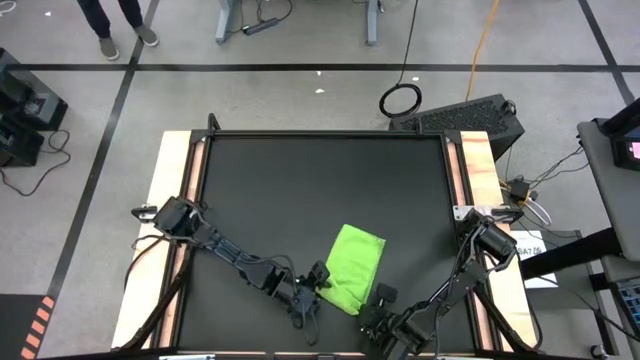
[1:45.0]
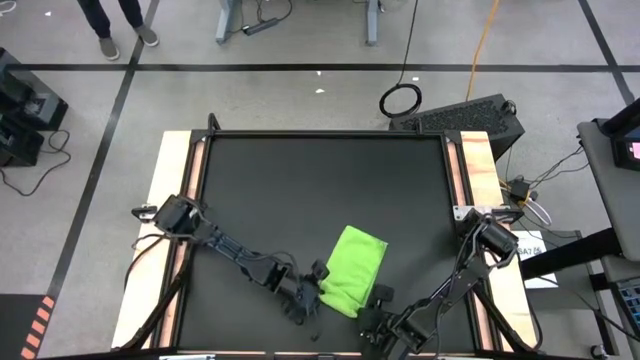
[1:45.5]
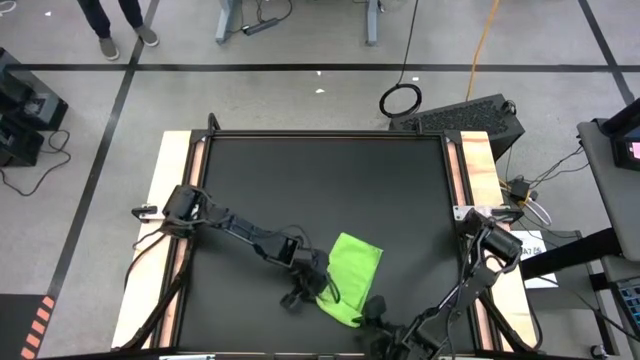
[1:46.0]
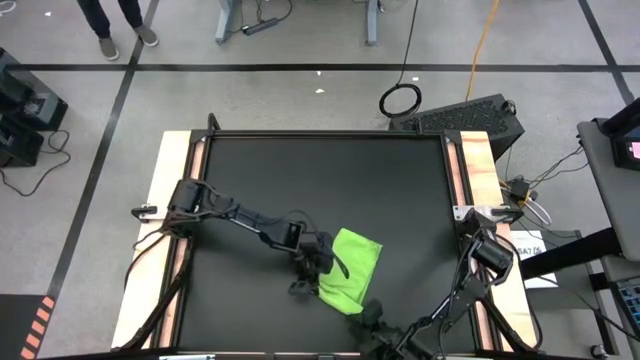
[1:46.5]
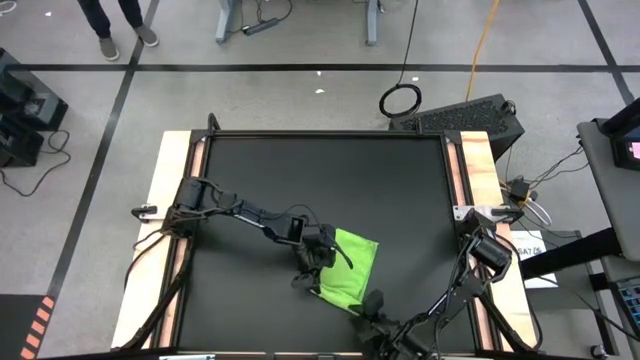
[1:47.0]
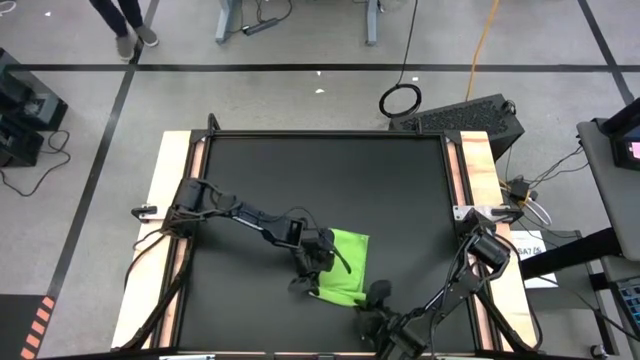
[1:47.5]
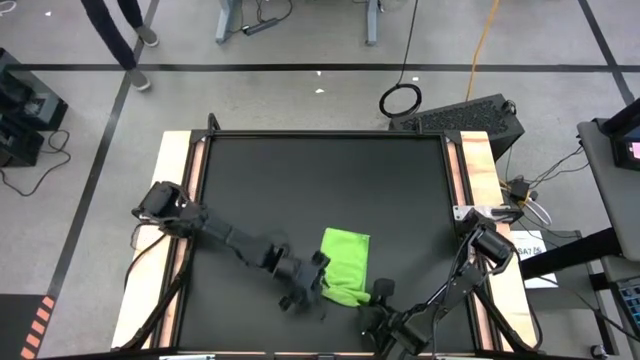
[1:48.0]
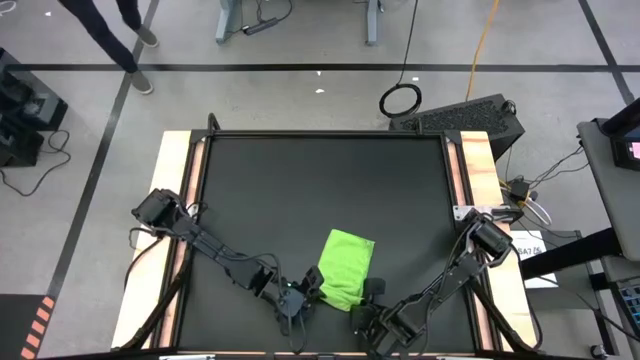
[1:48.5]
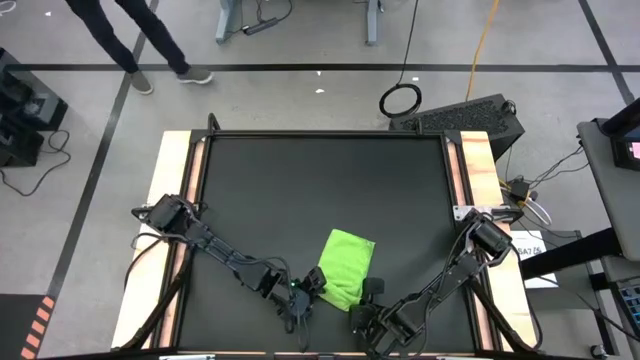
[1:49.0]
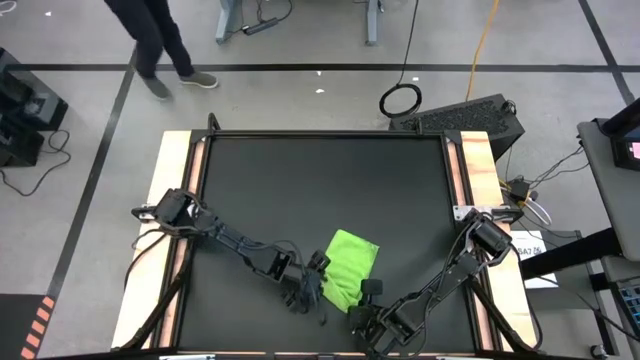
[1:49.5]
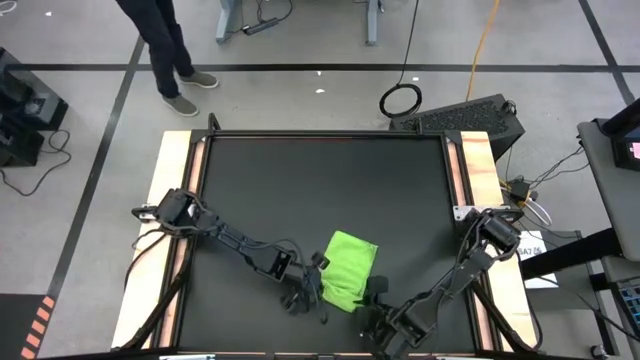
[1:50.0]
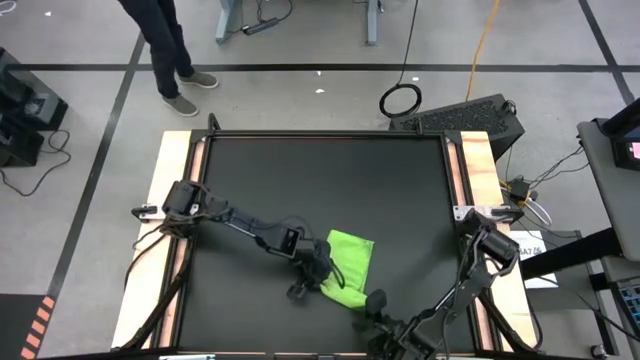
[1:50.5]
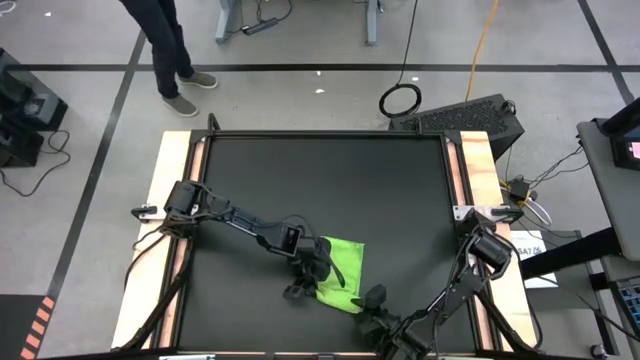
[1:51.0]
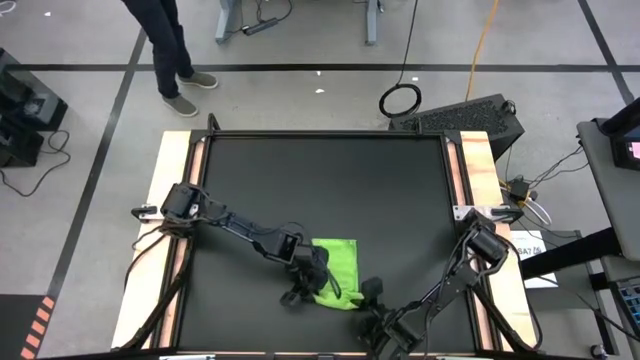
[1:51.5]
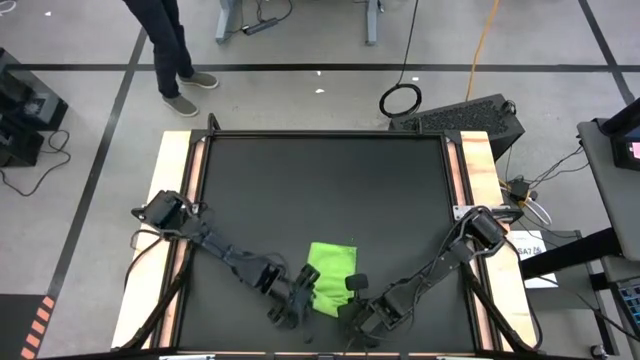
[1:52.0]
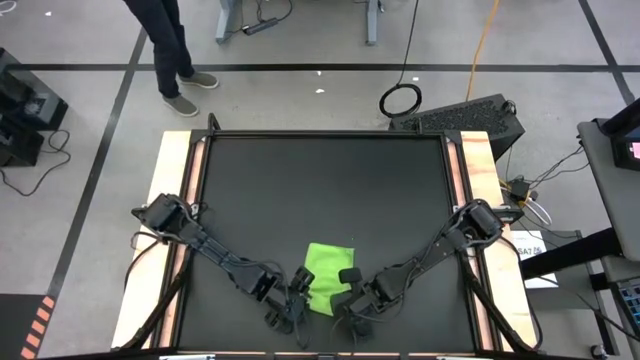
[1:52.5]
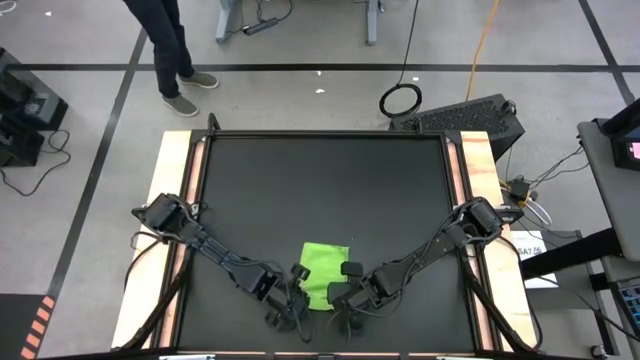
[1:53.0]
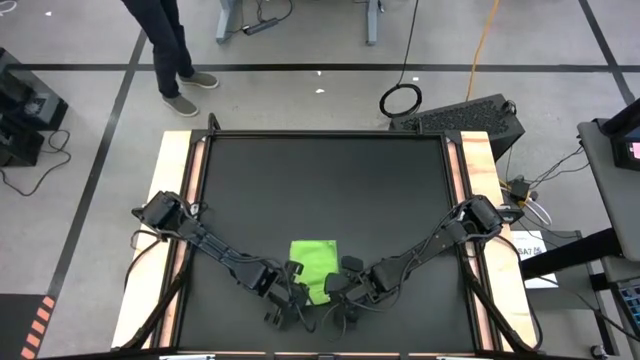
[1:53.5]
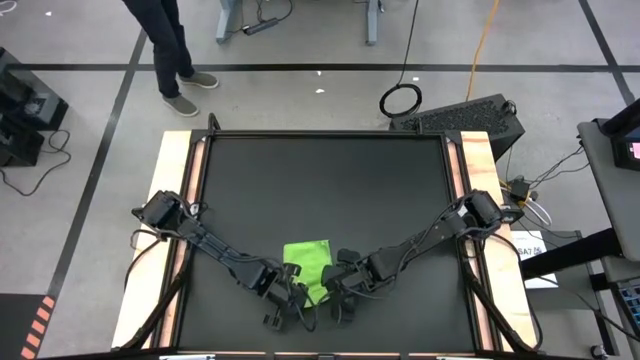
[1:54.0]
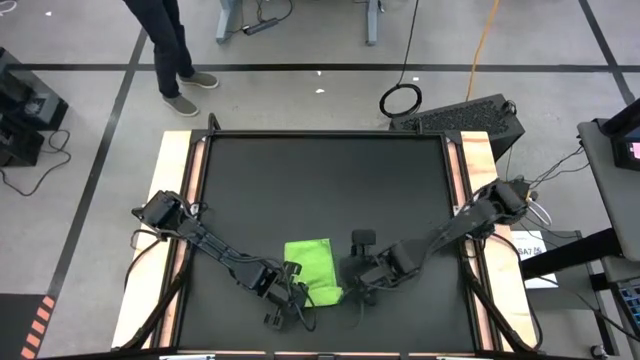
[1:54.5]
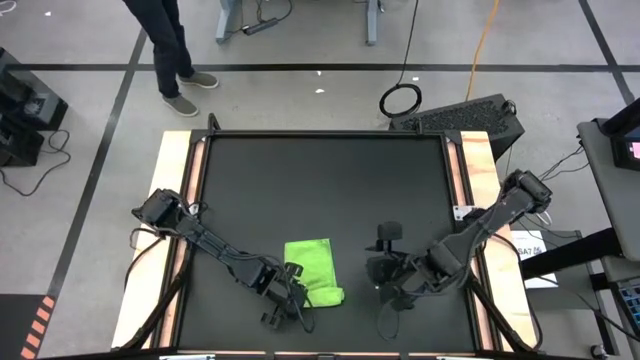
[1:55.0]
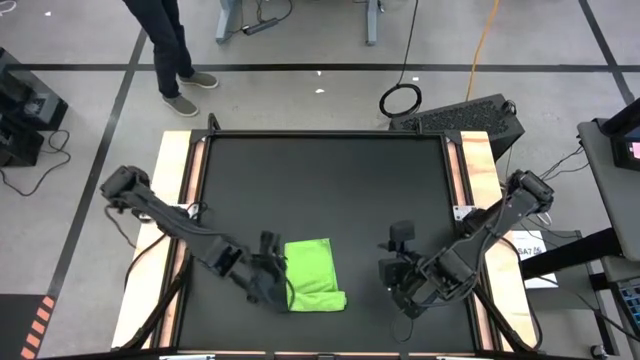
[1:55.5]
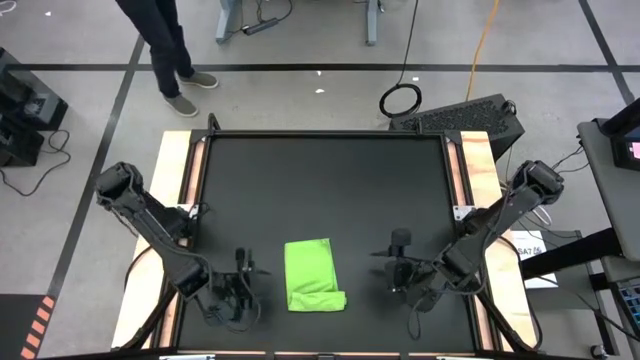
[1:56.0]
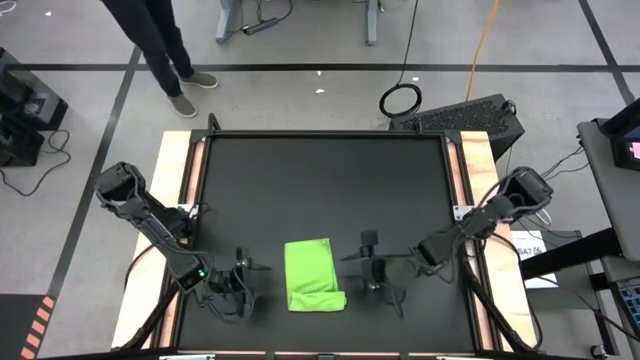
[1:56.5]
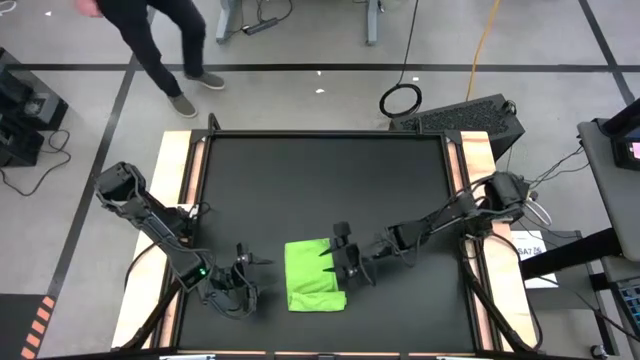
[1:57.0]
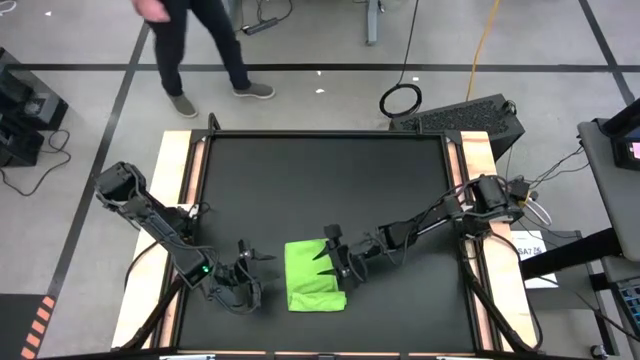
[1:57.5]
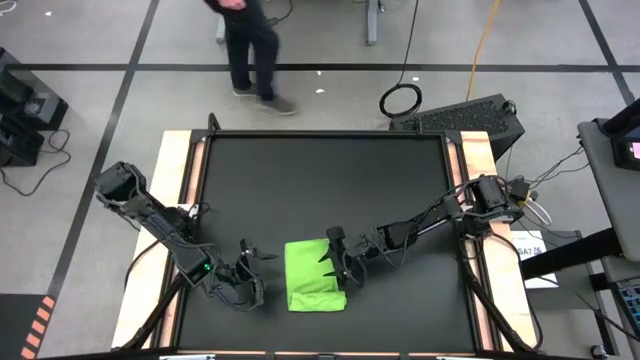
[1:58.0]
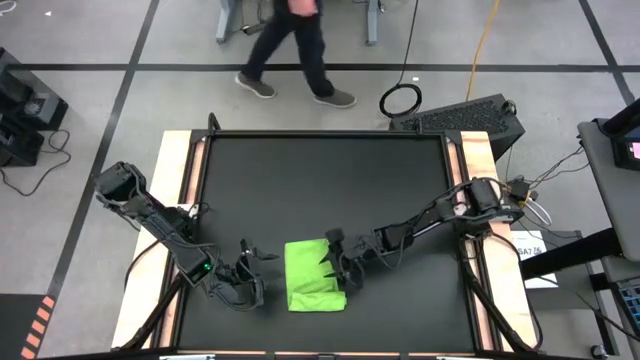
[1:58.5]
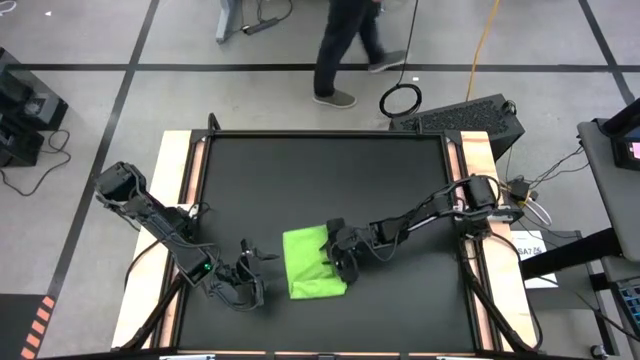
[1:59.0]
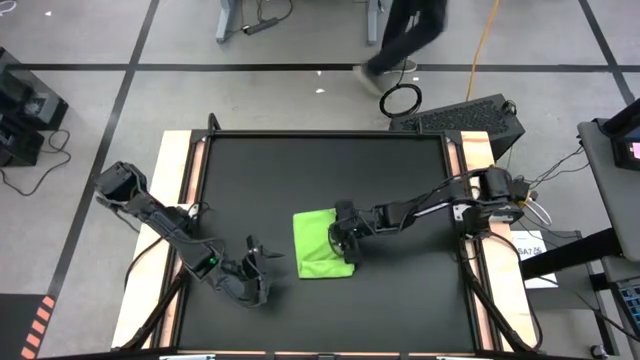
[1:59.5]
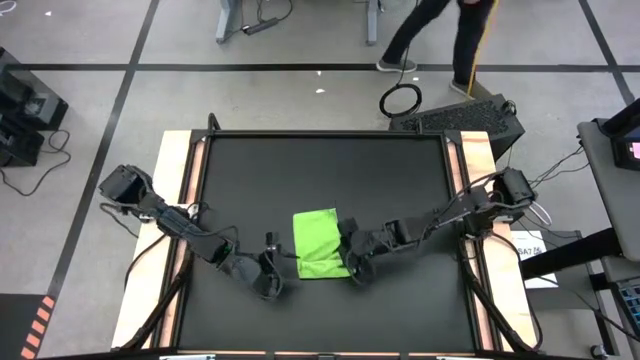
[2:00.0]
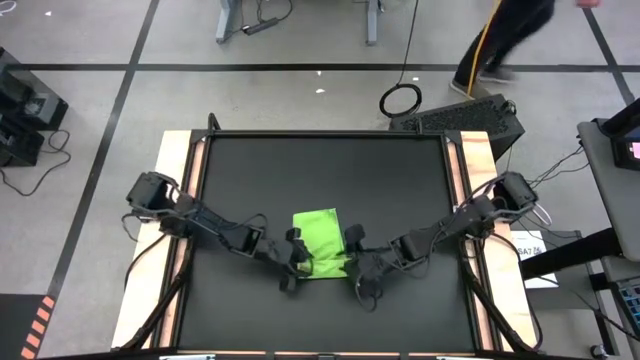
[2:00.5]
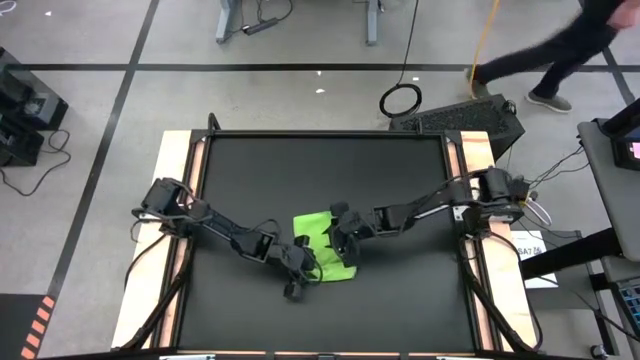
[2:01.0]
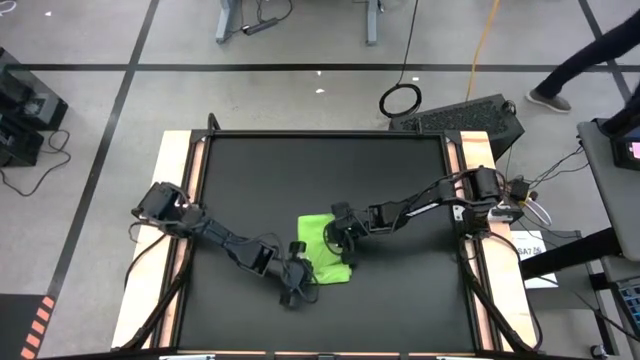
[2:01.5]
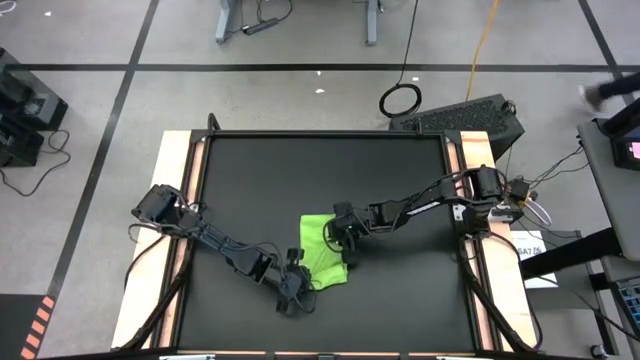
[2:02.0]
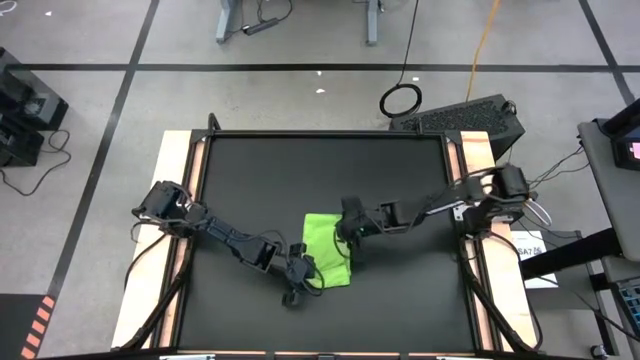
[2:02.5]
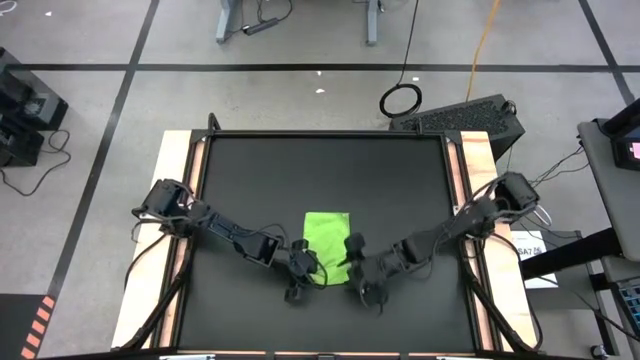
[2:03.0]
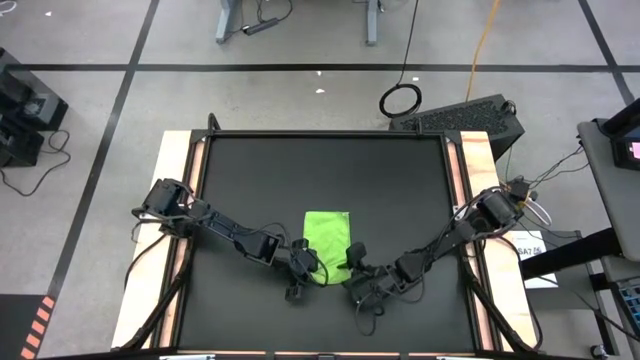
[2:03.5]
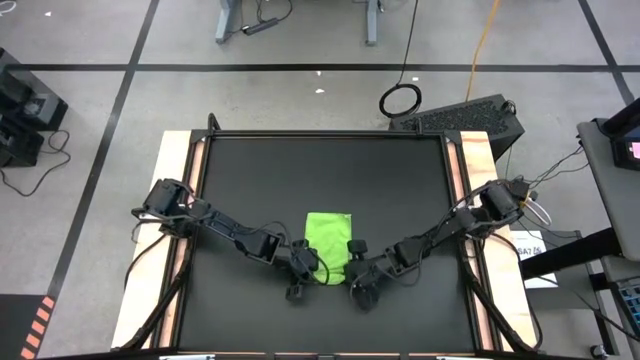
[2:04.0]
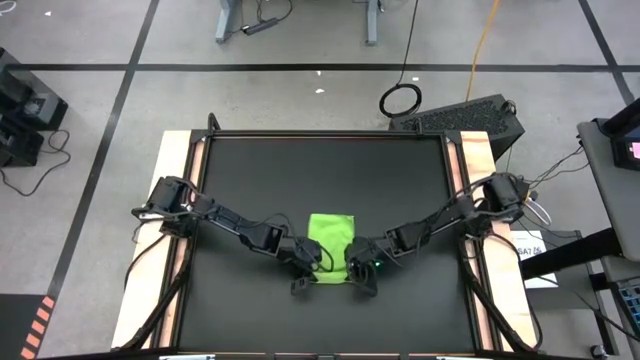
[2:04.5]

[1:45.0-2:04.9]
Task: Roll towel
Roll the green towel on the table
